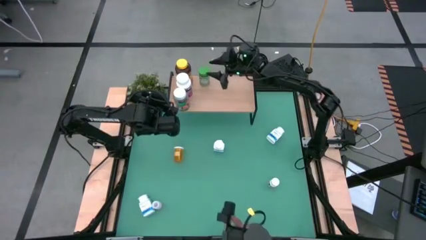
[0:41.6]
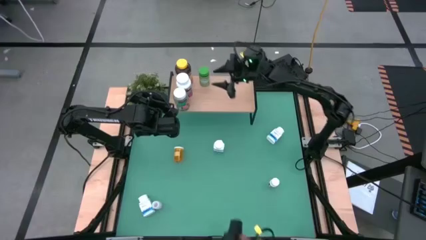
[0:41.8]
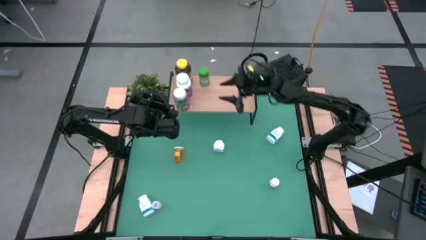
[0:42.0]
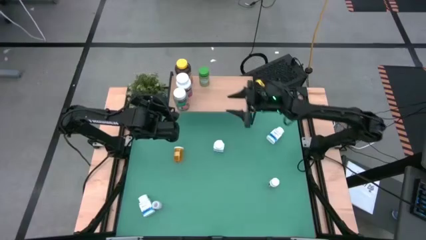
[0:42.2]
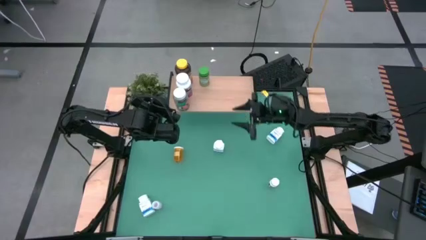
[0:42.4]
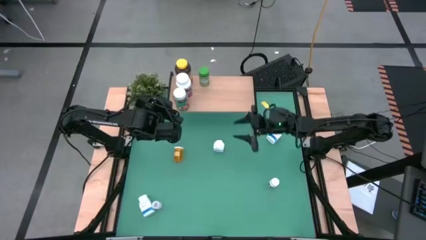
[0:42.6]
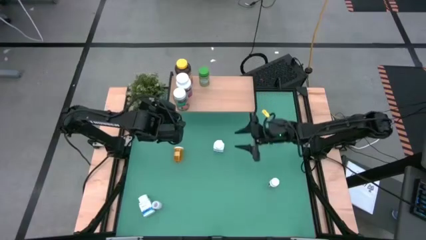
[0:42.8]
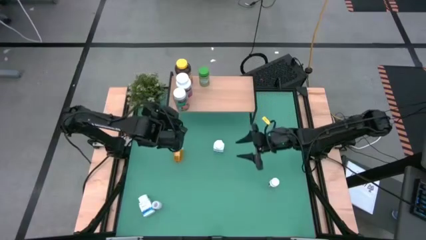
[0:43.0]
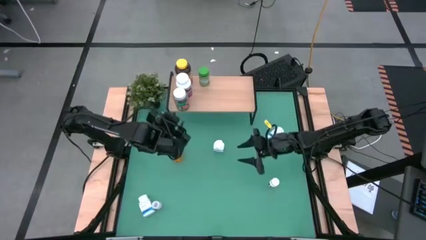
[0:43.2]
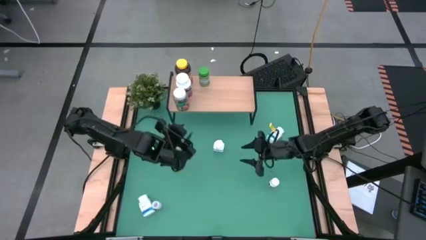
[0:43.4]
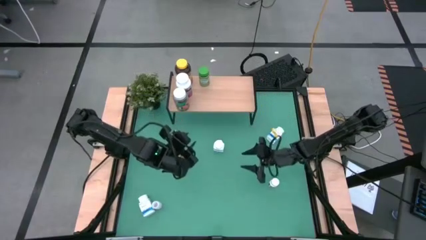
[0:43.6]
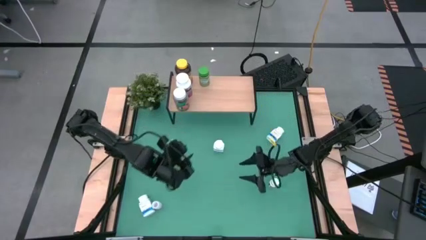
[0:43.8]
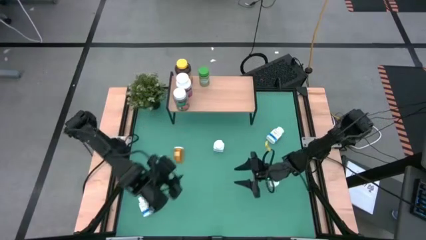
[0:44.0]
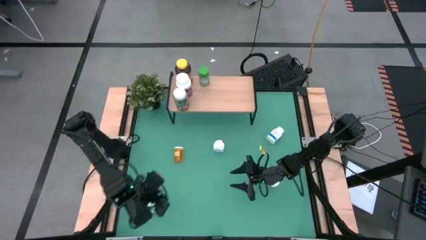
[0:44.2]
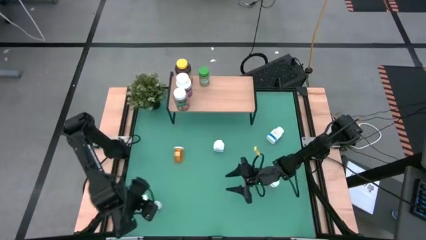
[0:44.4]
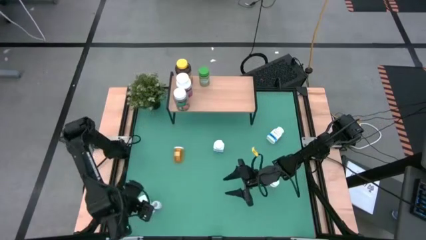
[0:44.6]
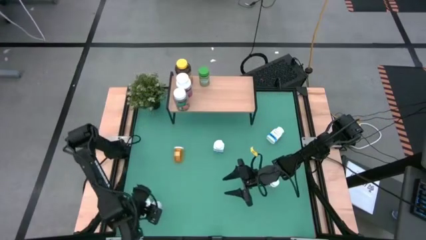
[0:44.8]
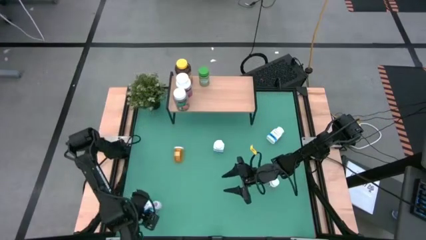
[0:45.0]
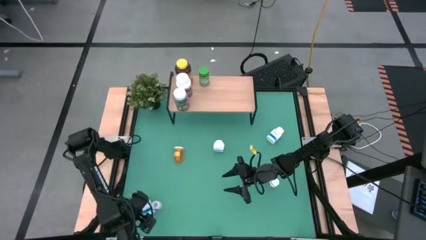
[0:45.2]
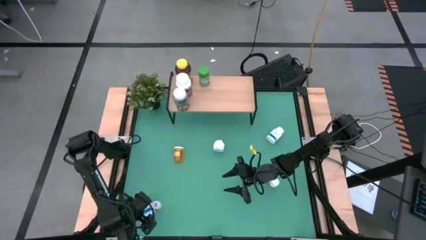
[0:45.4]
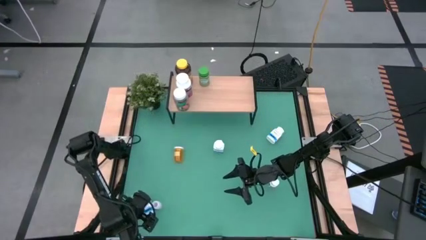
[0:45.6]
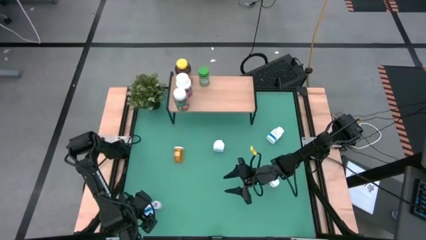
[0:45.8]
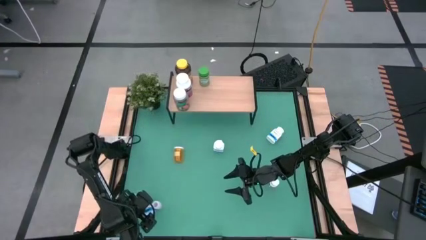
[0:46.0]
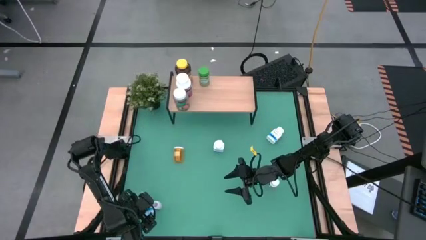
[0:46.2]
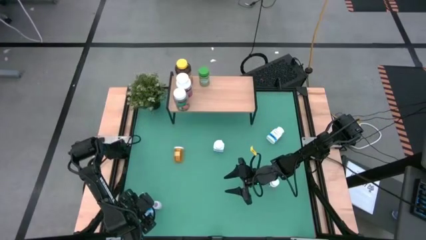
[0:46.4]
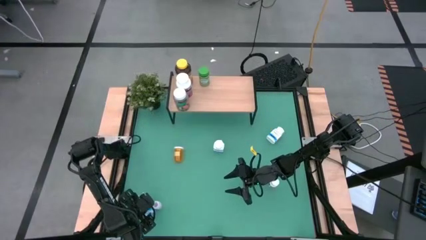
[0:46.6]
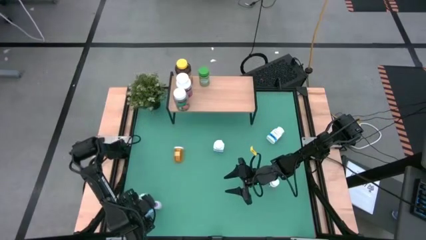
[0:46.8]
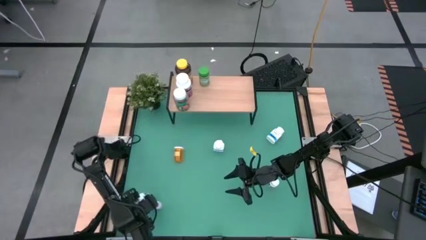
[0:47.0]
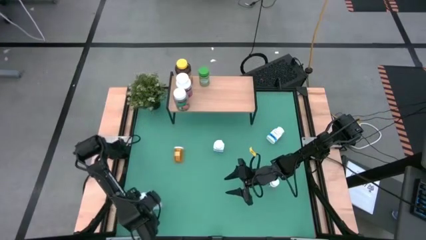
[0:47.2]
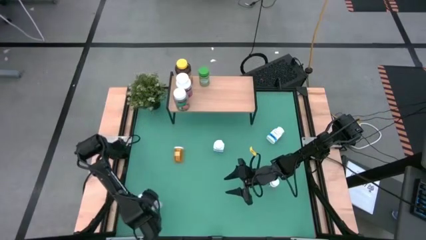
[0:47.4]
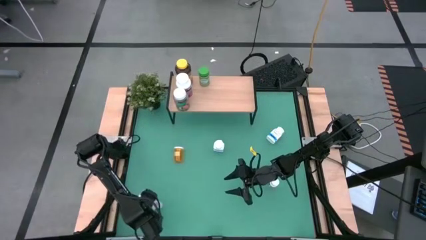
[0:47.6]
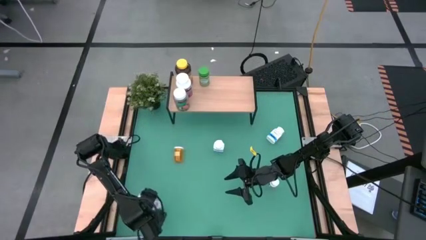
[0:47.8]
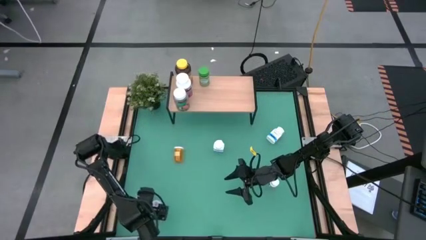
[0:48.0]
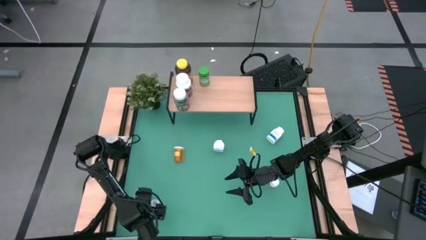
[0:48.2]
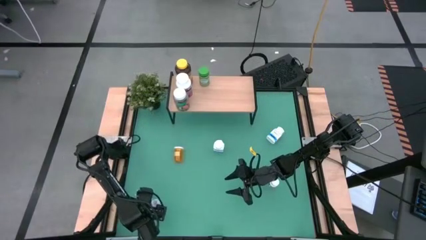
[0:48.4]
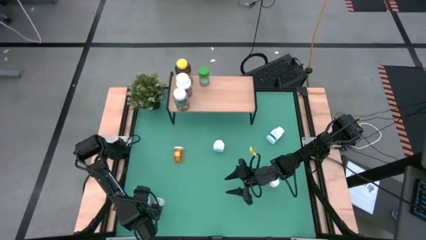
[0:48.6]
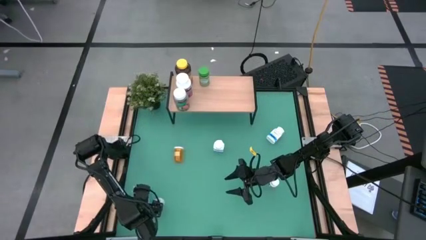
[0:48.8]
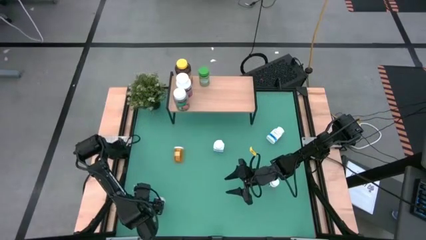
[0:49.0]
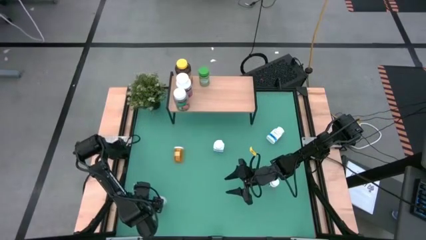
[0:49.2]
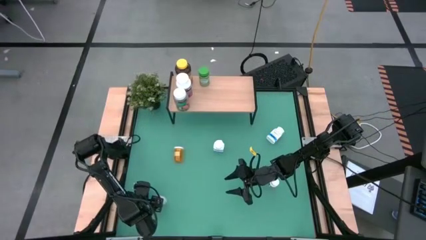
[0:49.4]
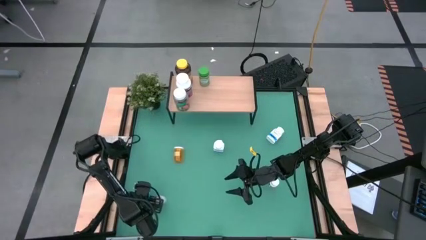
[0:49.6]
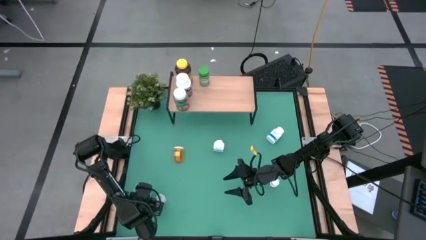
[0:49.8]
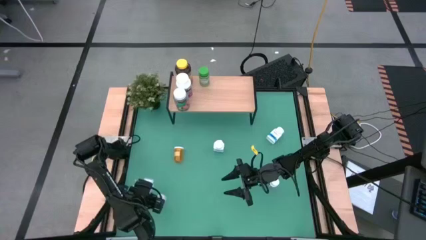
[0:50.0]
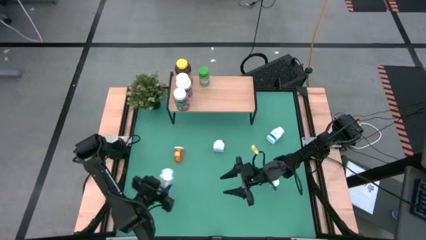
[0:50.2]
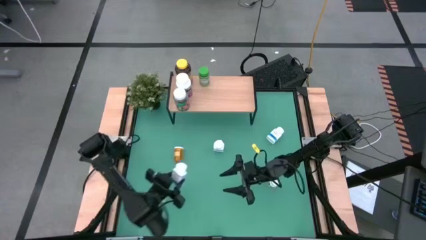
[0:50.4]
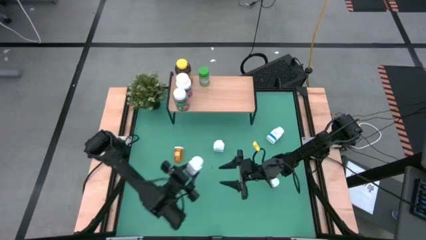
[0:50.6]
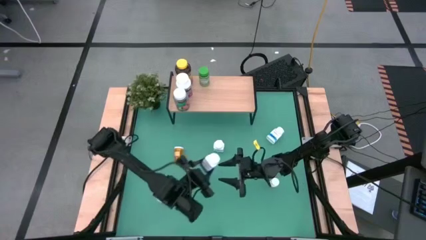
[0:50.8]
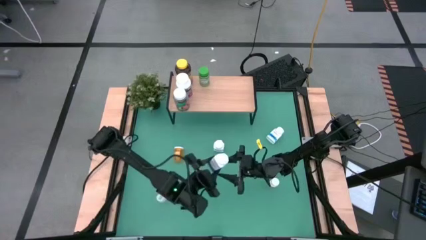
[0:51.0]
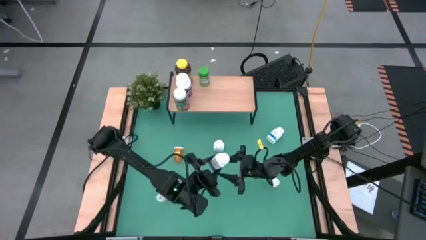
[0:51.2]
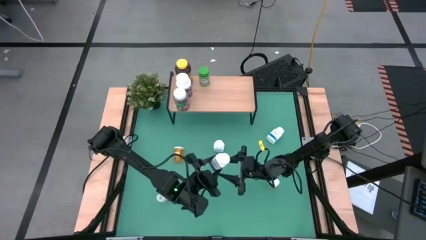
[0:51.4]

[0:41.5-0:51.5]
Task: Pick and place medicine bottles onto shelf by color
Put the bottom white and blue pill bottle on the shelf

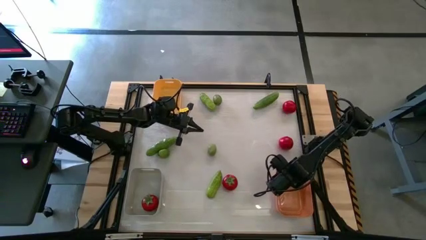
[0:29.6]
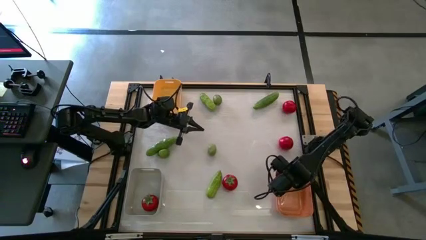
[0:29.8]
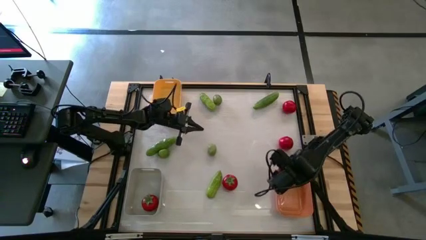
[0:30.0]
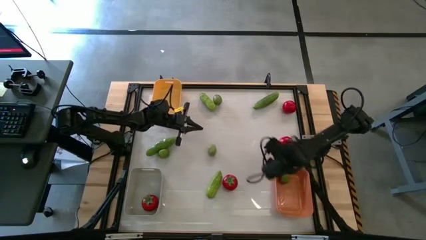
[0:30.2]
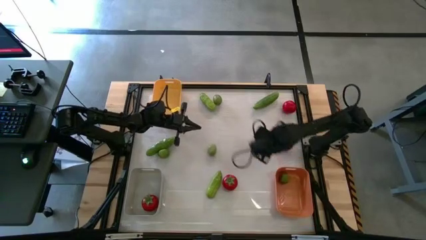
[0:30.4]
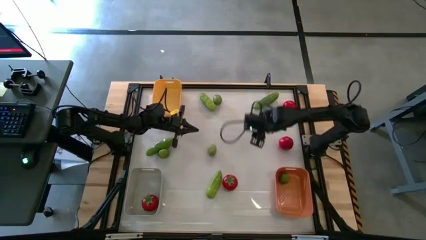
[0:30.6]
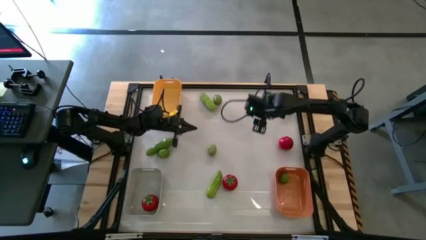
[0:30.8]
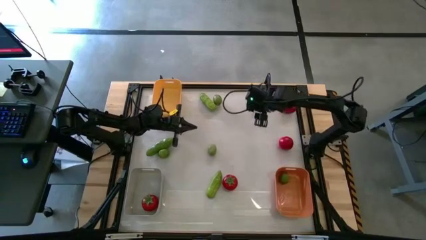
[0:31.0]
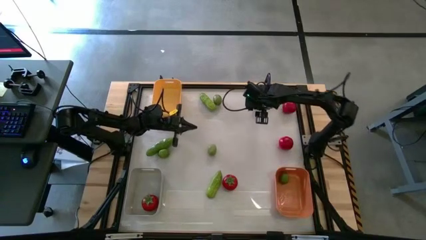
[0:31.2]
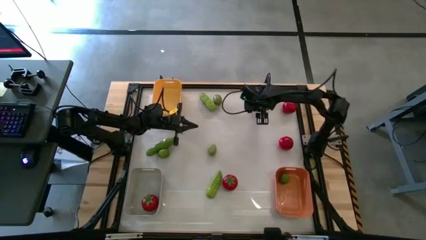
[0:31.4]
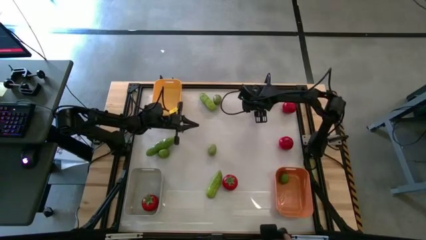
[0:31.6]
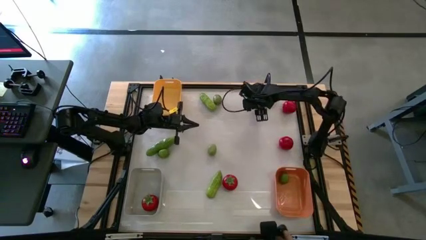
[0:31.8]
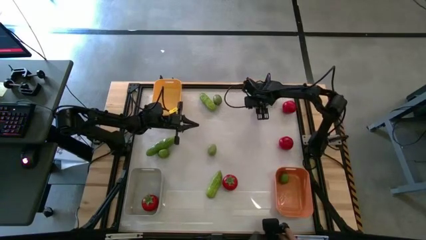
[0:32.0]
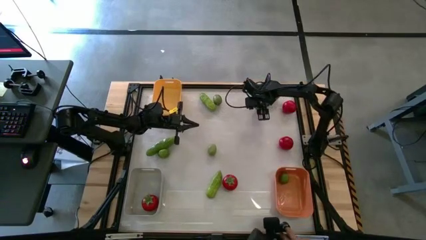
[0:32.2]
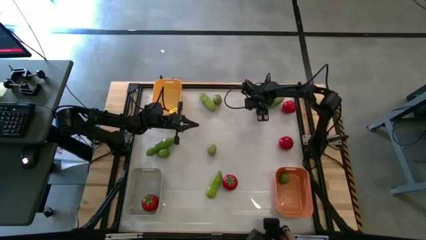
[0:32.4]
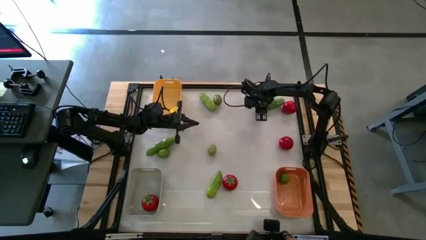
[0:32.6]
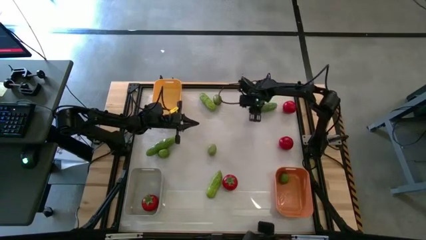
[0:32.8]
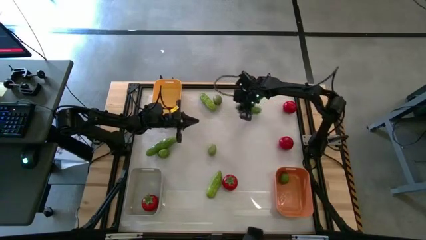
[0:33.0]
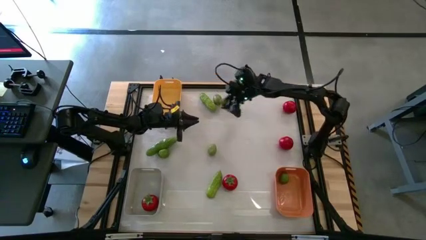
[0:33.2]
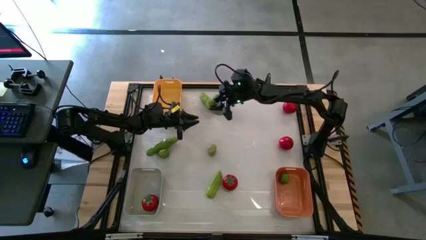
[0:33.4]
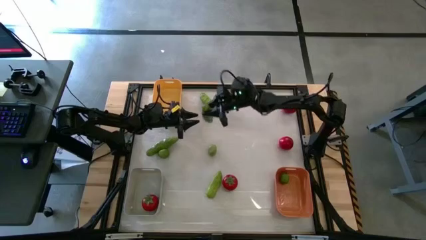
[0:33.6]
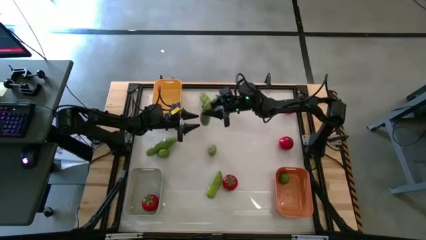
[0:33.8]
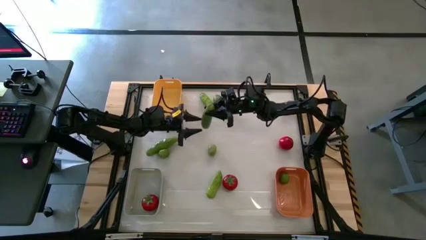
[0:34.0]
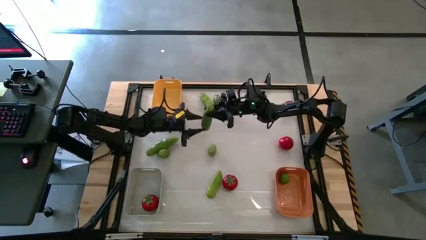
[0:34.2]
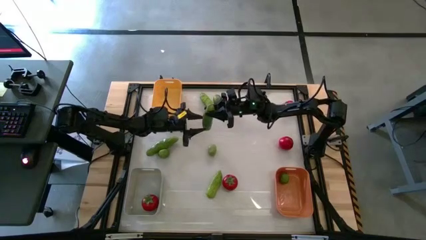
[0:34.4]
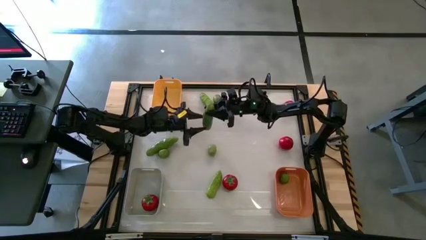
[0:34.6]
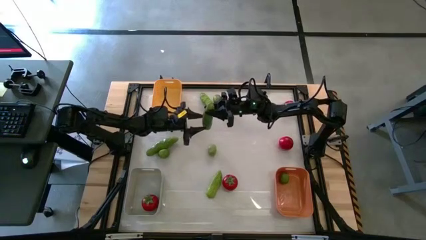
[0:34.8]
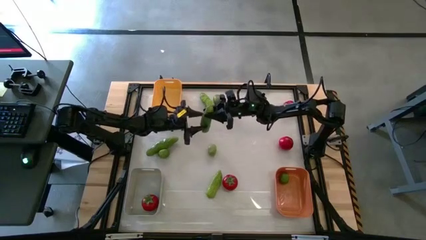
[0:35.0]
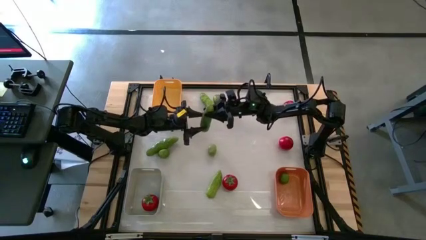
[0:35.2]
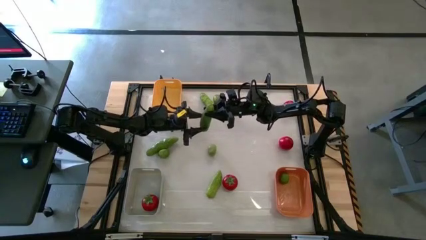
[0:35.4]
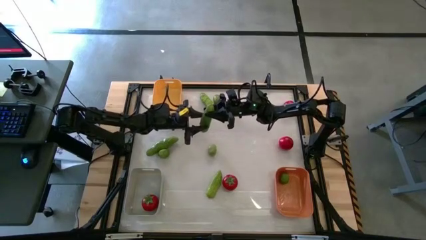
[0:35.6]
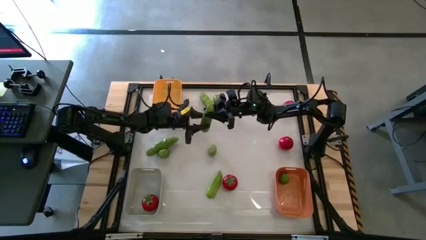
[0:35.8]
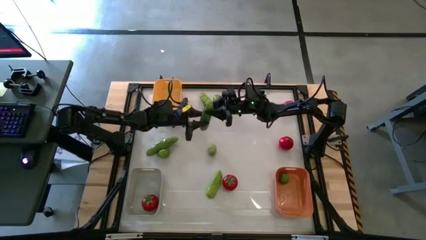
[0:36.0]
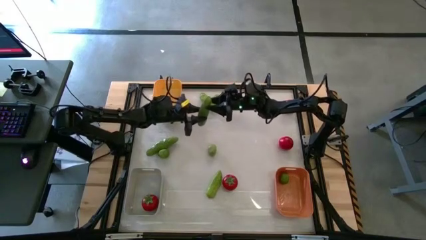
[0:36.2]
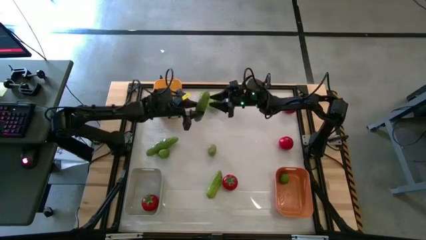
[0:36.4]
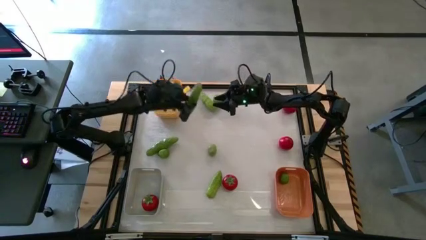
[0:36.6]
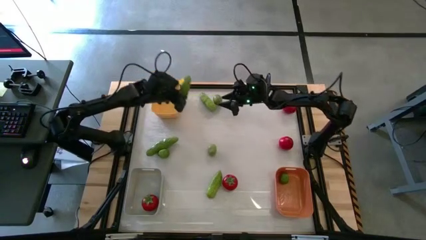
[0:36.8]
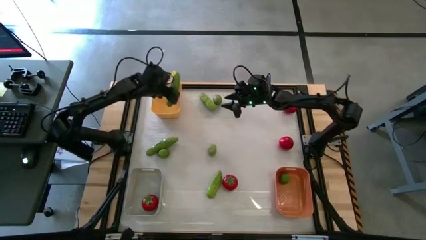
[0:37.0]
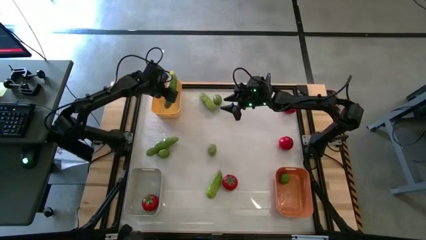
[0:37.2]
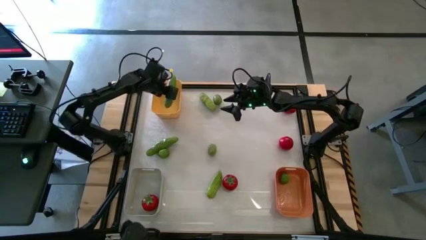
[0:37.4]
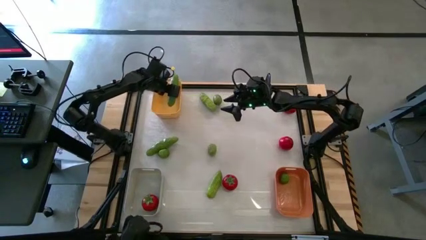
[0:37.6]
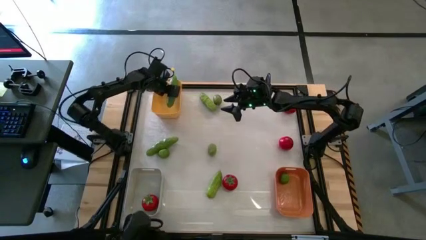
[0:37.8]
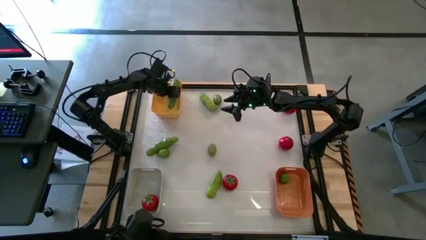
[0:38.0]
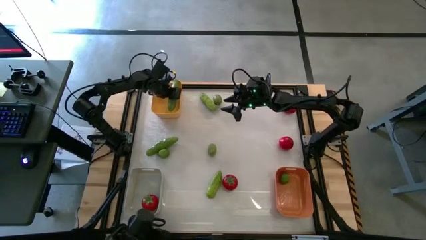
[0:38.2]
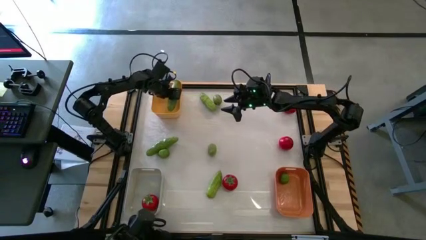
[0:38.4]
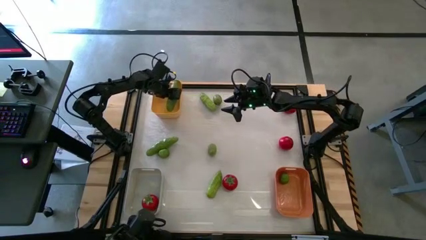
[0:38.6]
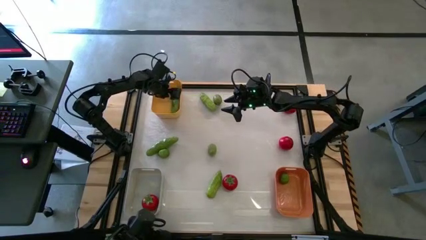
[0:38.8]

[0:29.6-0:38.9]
Task: Sort produce into baskets
Put the green cucumber into the yellow bin
